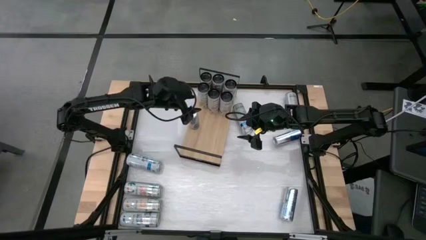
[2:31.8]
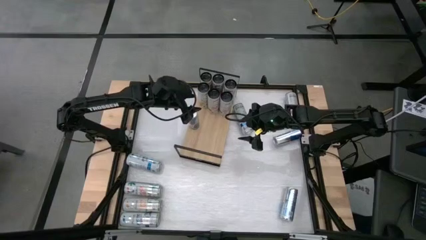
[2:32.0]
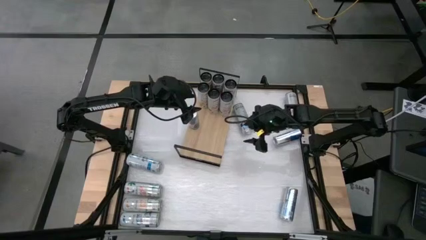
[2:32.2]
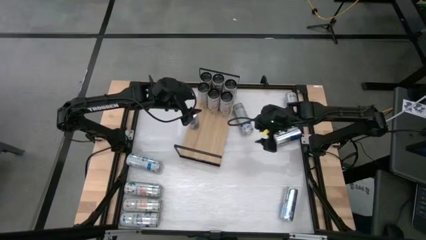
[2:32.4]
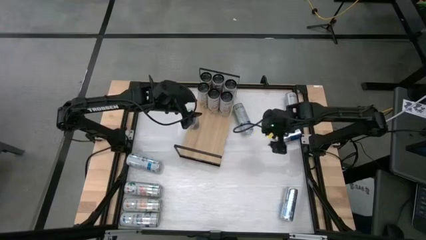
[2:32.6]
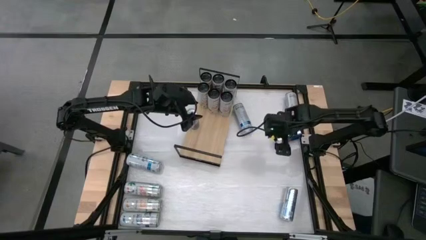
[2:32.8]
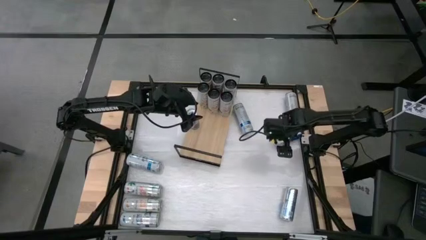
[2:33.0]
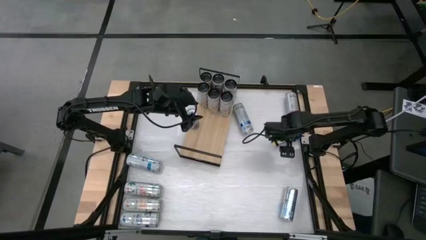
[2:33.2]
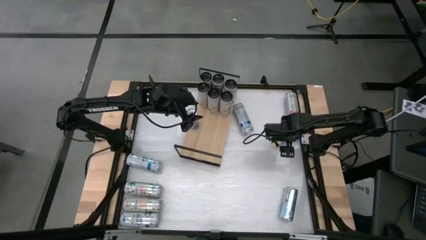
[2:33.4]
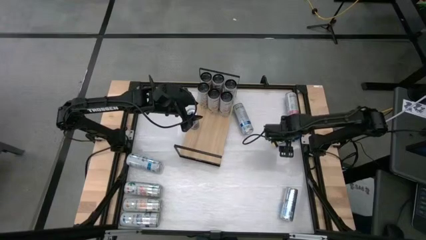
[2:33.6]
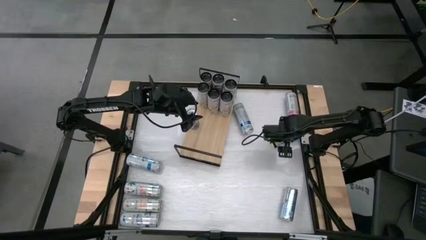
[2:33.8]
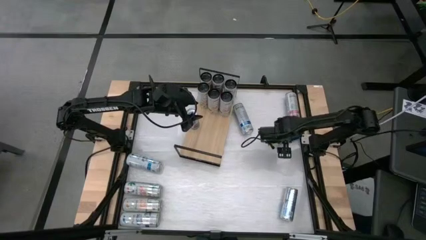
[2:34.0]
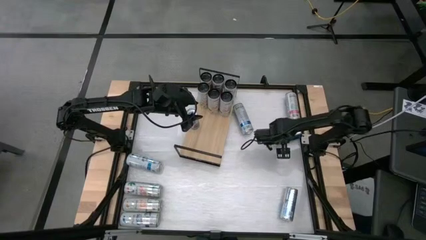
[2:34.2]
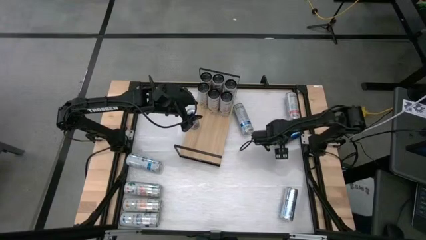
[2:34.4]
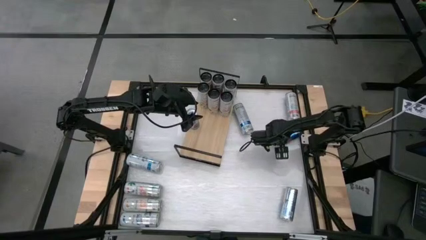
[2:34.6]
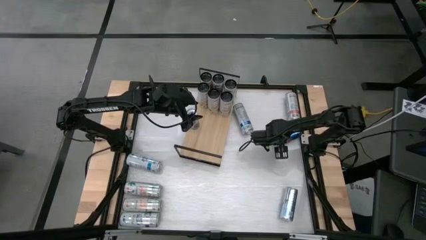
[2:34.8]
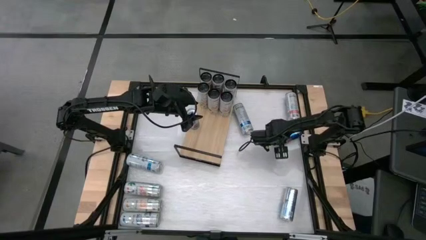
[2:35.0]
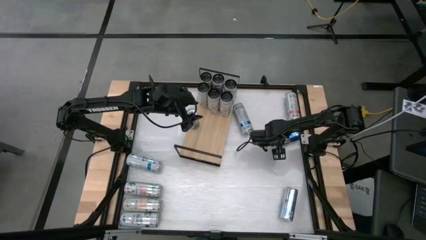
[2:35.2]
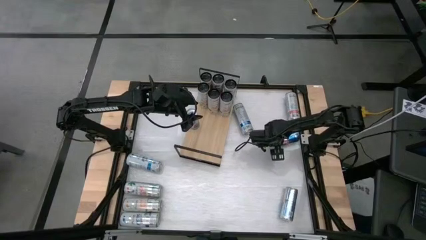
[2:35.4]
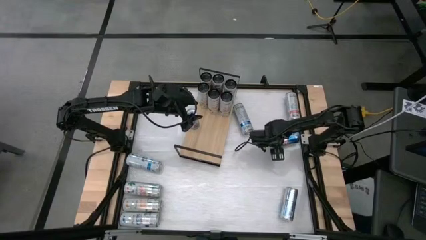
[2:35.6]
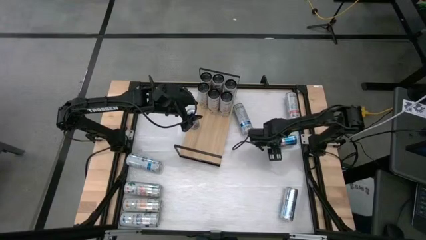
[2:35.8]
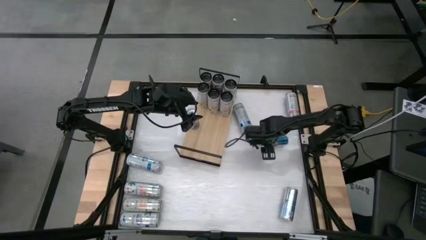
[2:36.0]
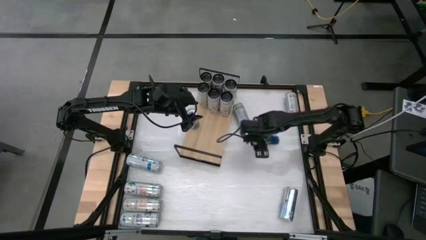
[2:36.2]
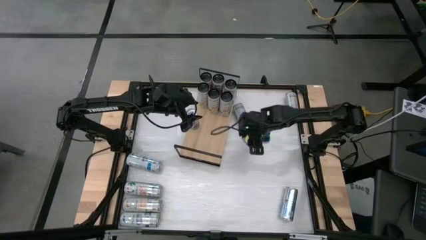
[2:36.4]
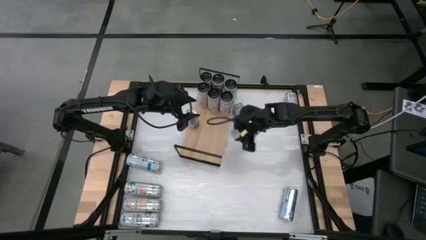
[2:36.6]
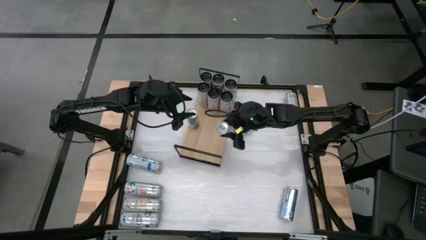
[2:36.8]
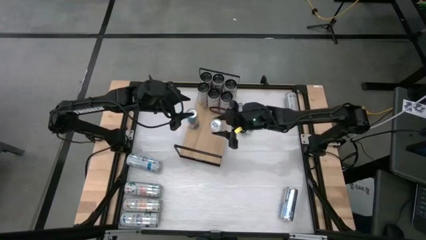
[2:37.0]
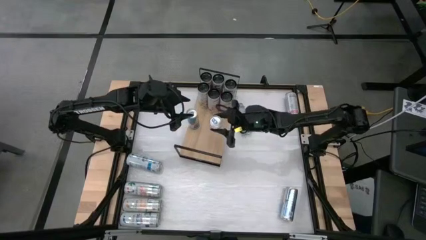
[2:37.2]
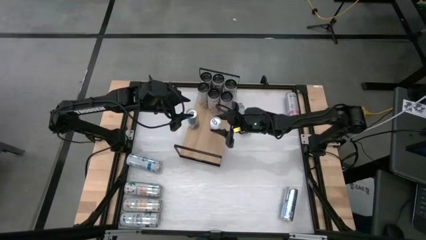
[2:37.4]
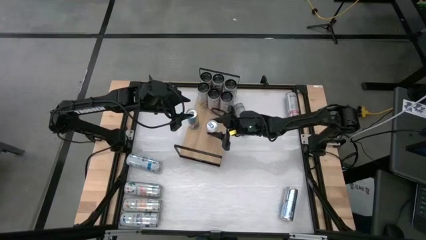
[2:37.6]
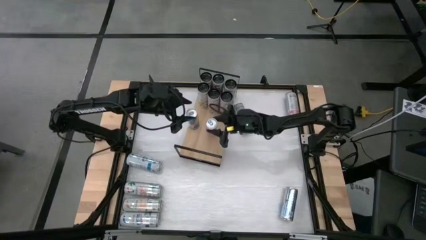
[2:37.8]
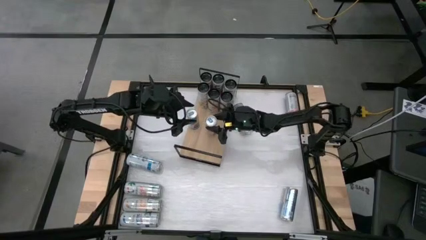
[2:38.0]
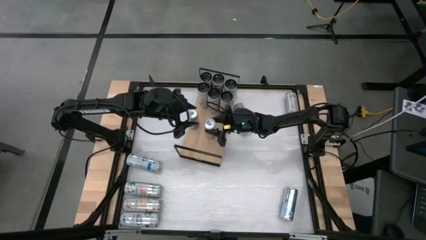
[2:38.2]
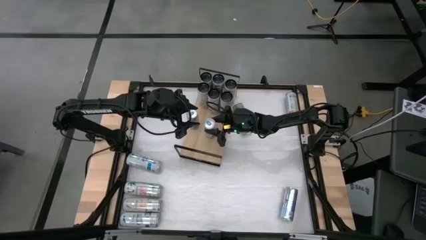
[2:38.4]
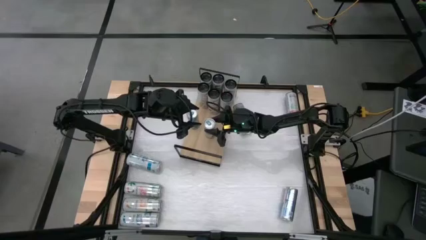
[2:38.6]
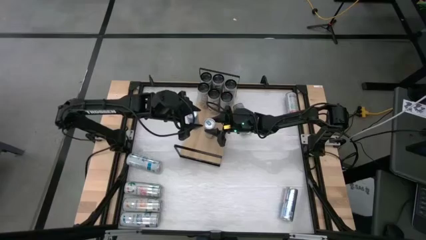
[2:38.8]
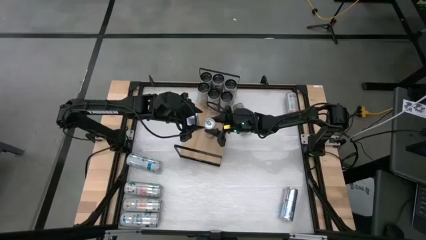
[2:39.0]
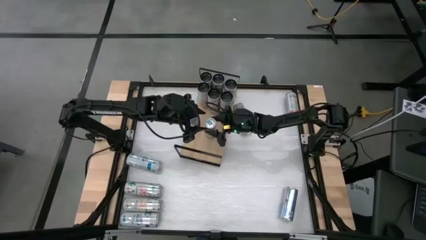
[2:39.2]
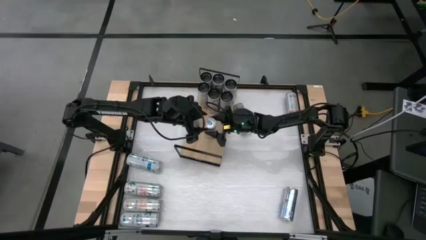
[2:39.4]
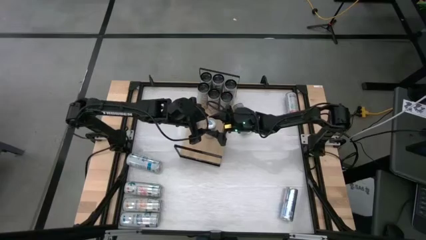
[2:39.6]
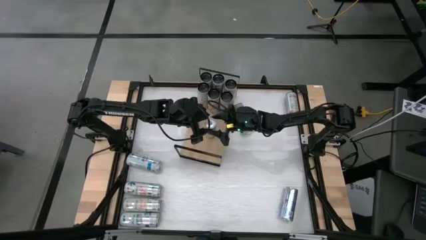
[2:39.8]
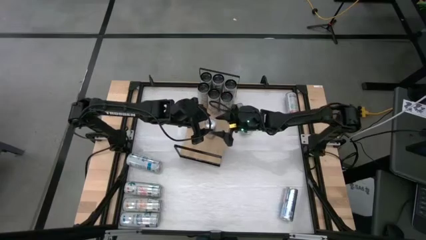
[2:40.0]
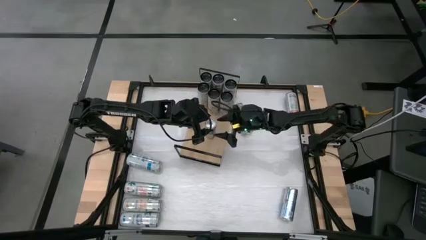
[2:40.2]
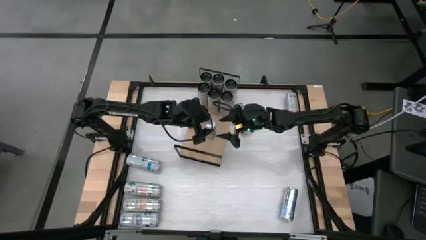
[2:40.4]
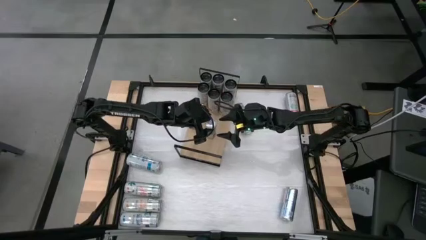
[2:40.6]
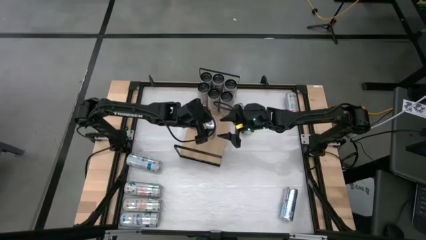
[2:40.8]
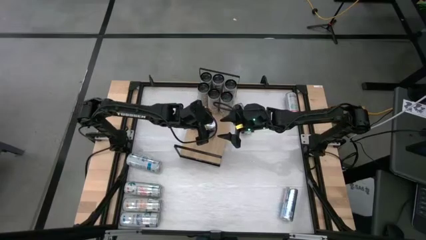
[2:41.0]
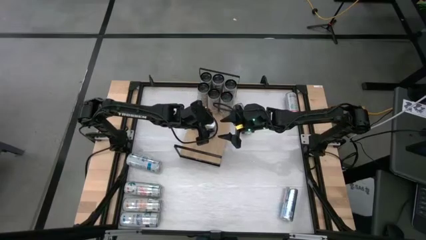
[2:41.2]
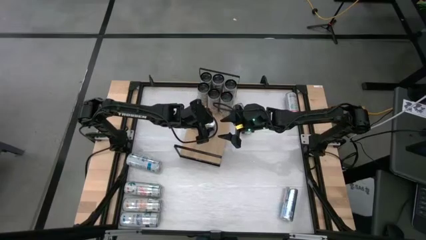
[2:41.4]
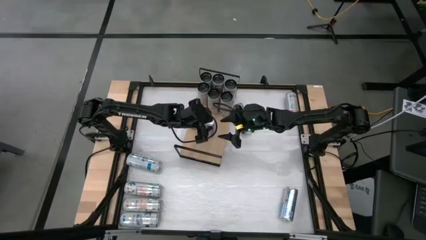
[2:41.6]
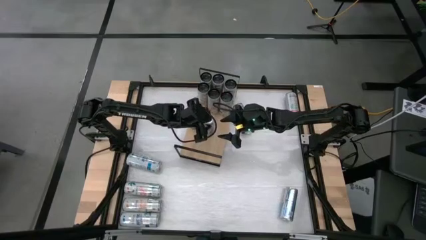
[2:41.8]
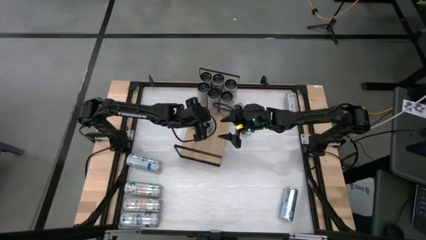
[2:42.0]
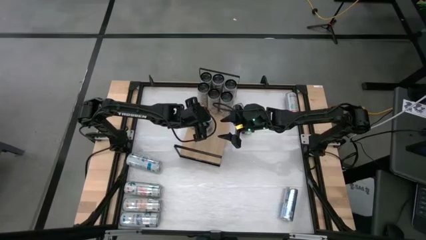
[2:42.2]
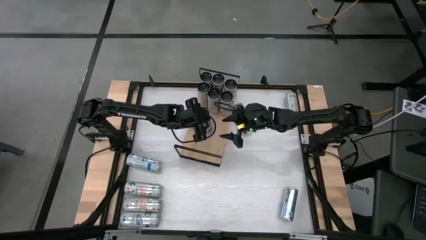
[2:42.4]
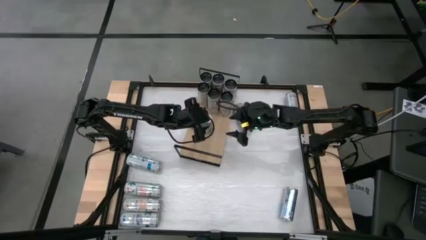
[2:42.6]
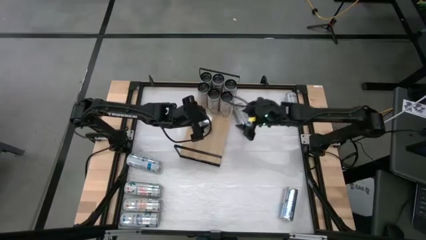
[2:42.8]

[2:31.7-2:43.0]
Task: Place canned beverage on shelf
Put the top right silver soda can on the shelf aligned with the other silver soda can

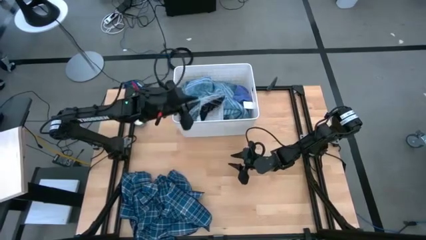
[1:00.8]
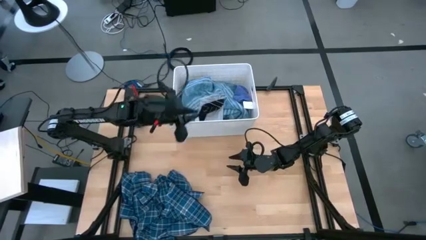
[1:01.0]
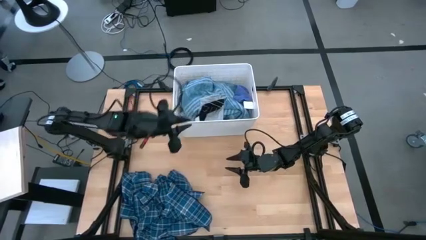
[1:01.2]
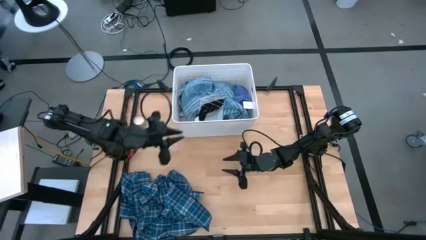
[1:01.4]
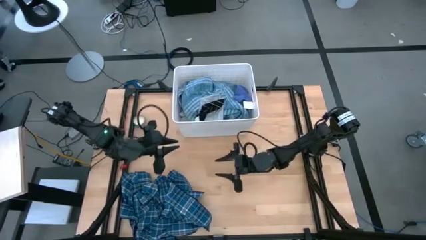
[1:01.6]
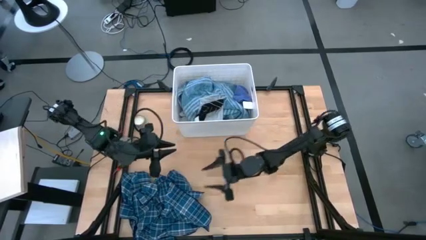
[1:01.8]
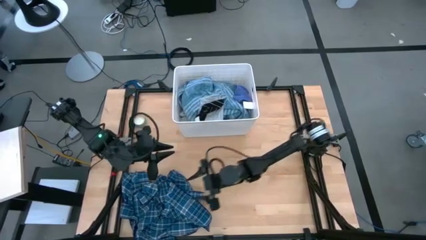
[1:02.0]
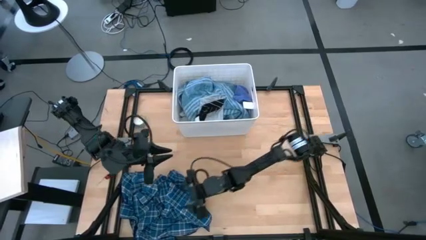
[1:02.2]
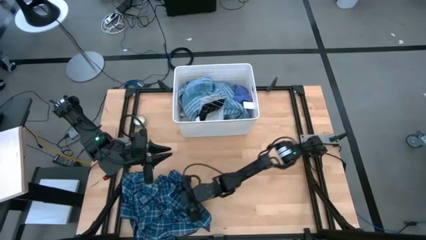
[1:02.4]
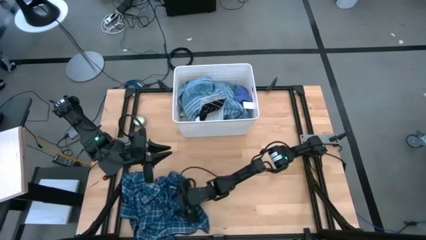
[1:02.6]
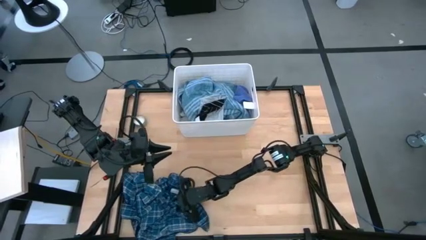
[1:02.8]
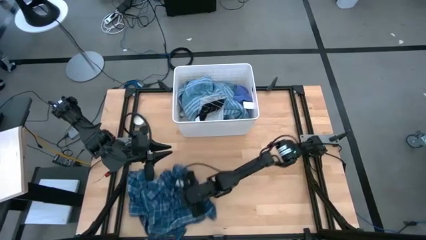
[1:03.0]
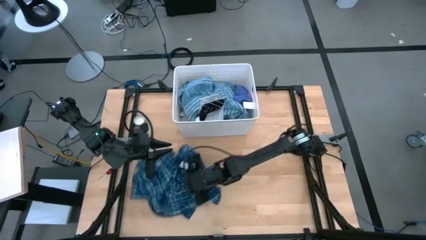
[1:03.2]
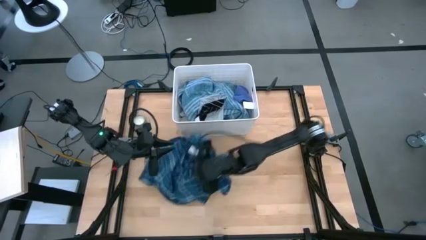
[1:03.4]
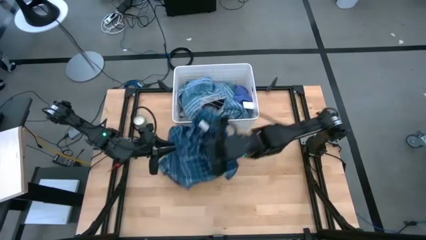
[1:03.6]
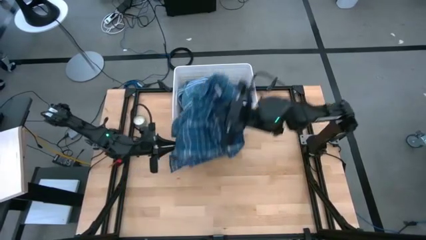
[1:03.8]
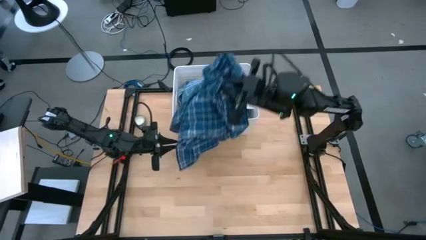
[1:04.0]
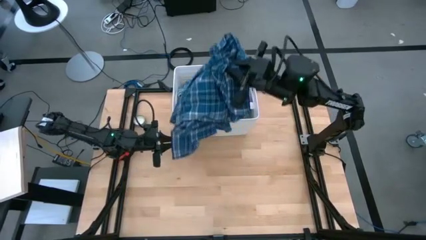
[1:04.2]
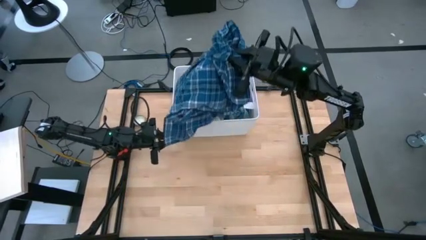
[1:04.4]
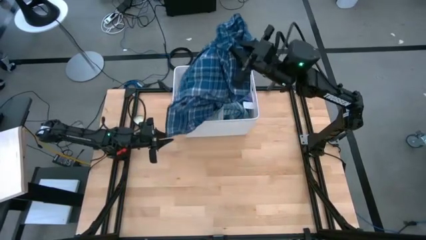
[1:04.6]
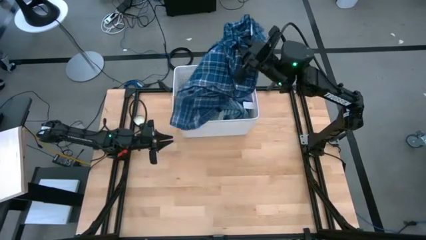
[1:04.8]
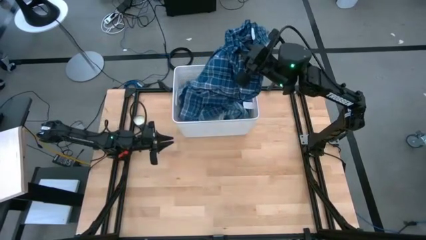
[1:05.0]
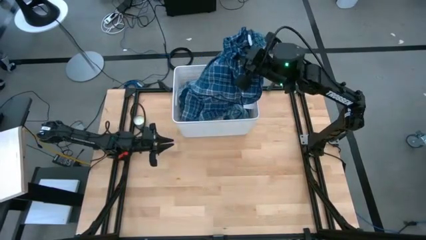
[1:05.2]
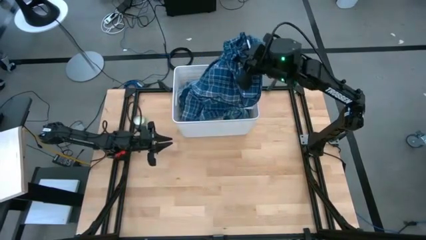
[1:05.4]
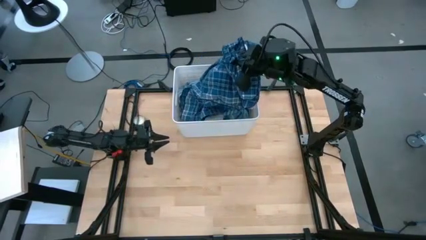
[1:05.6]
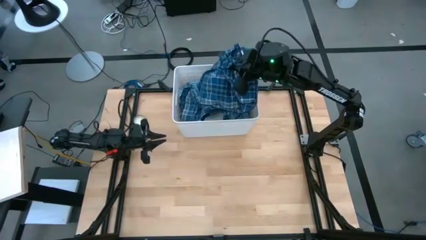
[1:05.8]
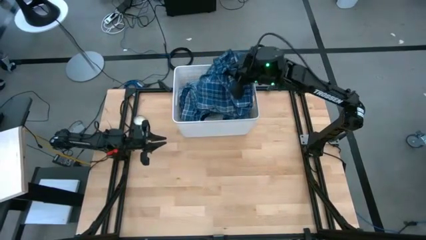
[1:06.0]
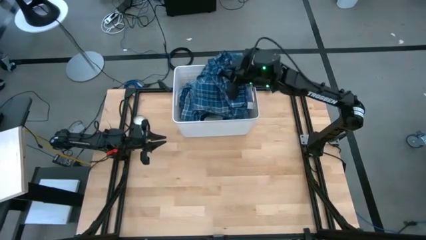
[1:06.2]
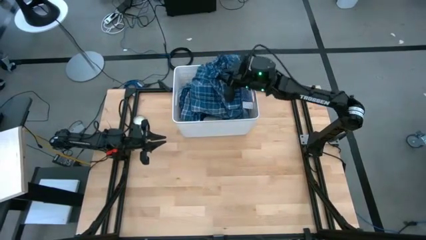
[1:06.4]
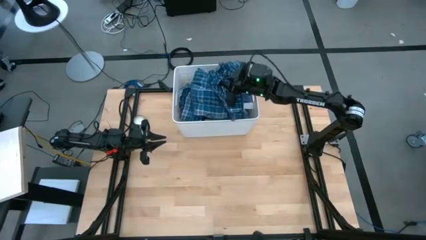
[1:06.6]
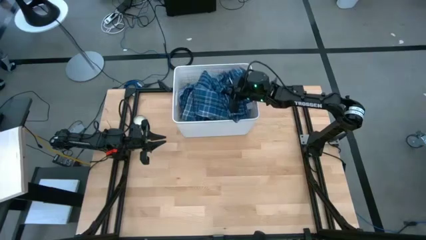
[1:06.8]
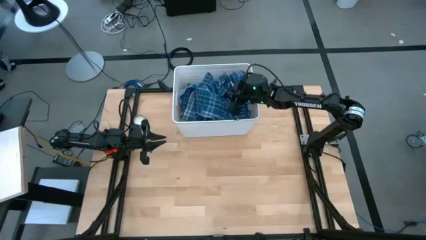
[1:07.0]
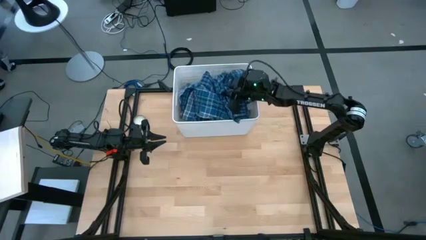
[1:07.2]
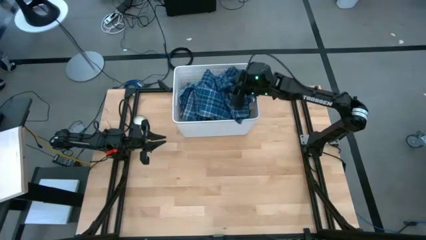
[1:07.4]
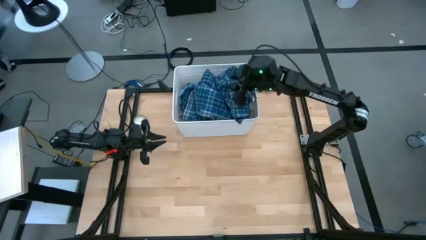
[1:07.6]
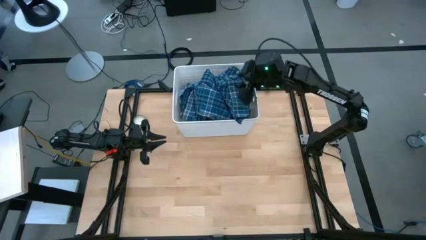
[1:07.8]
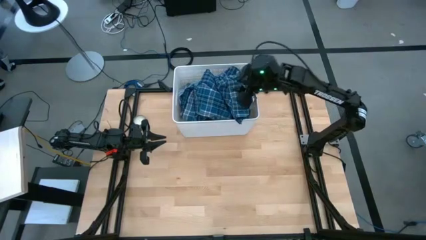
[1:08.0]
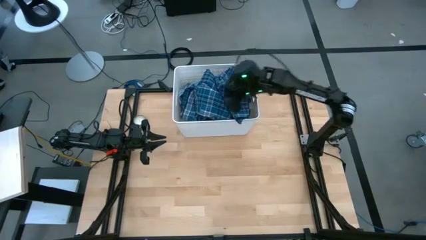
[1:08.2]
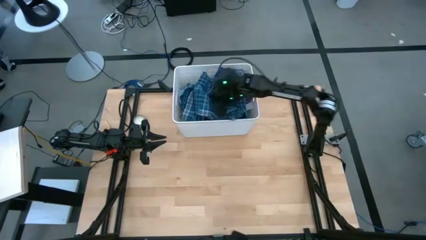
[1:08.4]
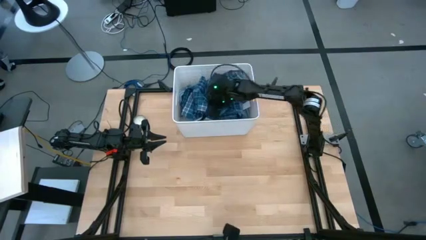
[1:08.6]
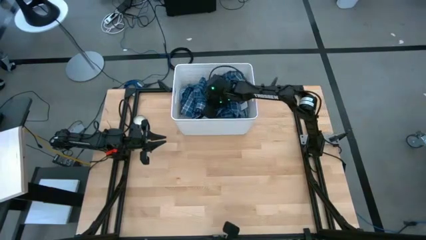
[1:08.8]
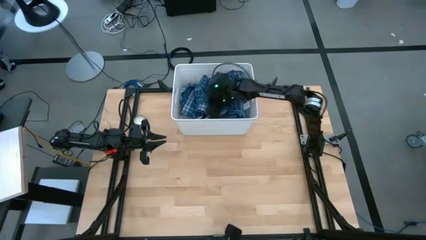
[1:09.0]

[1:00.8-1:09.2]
Task: Sort clothes
Put the blue plaid shirt into the white bin
